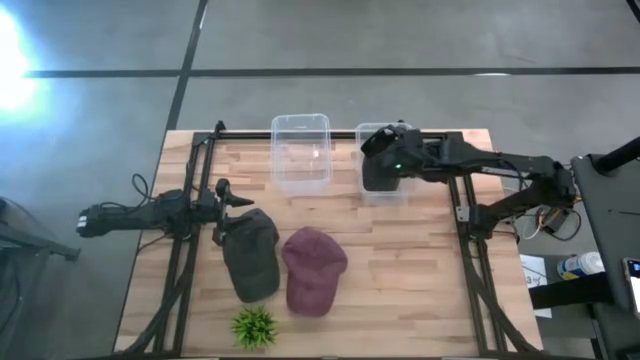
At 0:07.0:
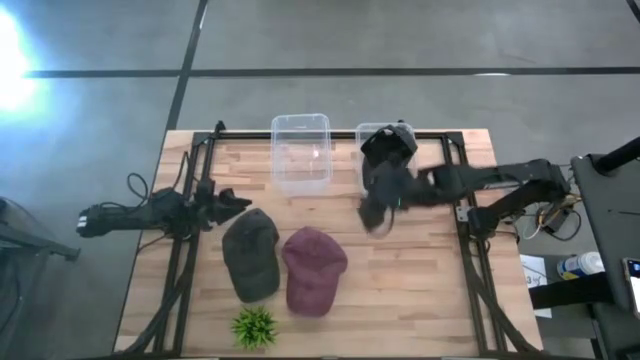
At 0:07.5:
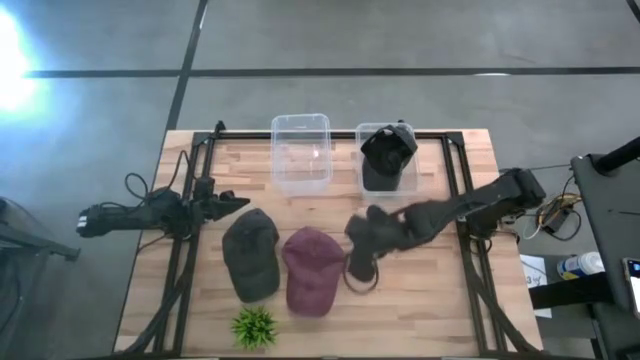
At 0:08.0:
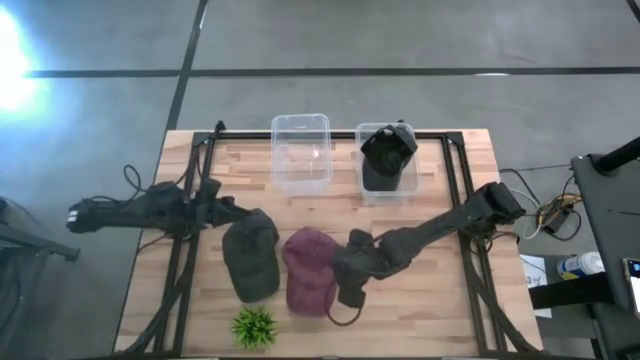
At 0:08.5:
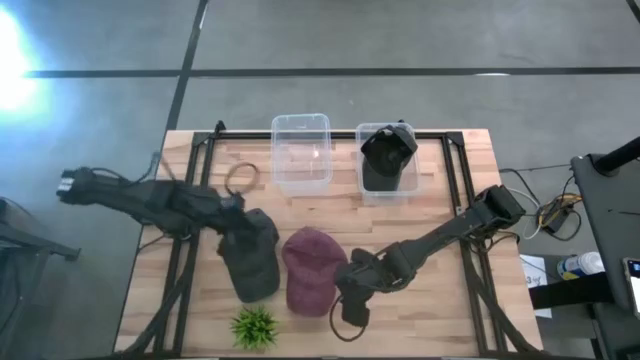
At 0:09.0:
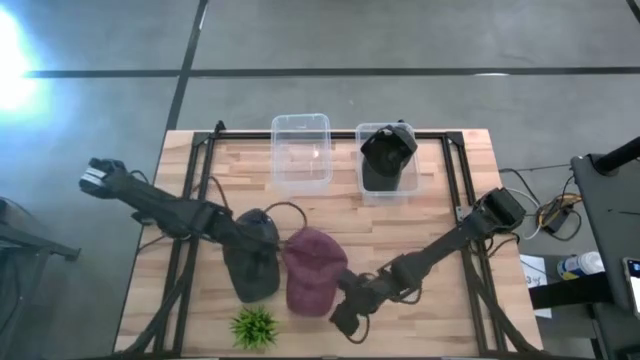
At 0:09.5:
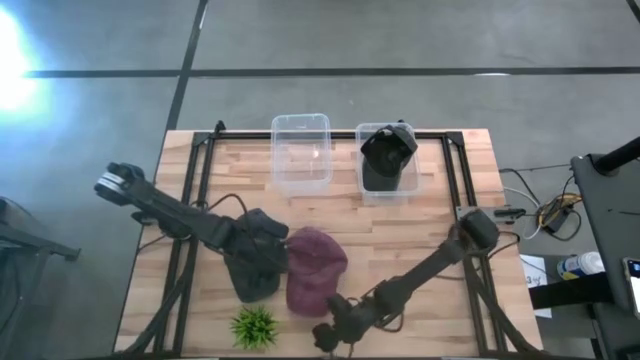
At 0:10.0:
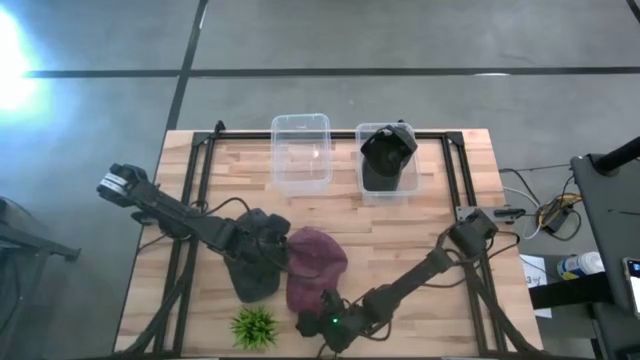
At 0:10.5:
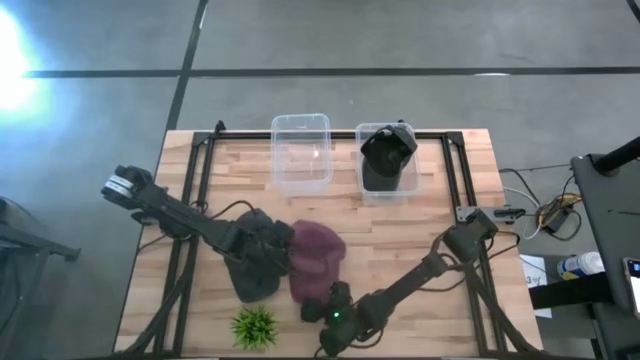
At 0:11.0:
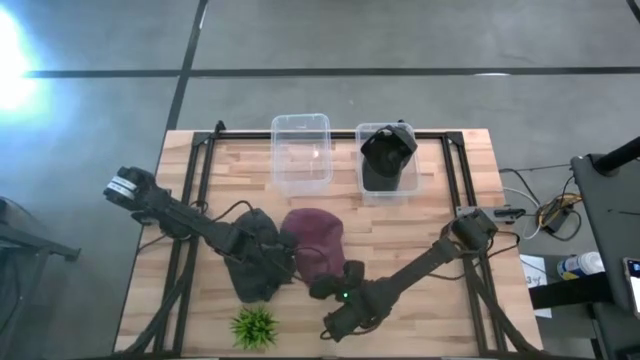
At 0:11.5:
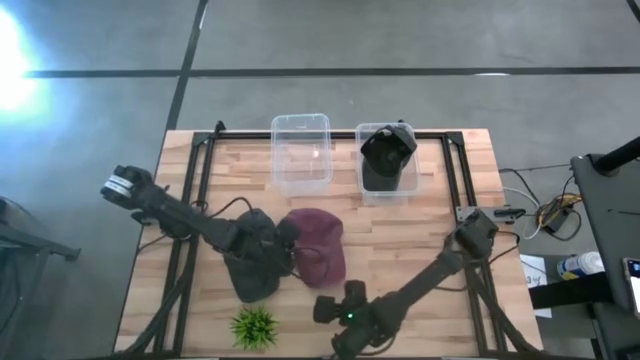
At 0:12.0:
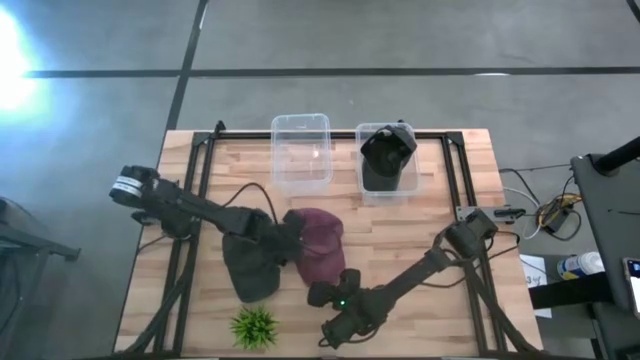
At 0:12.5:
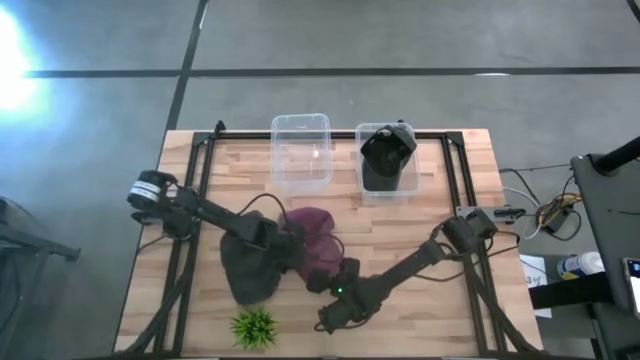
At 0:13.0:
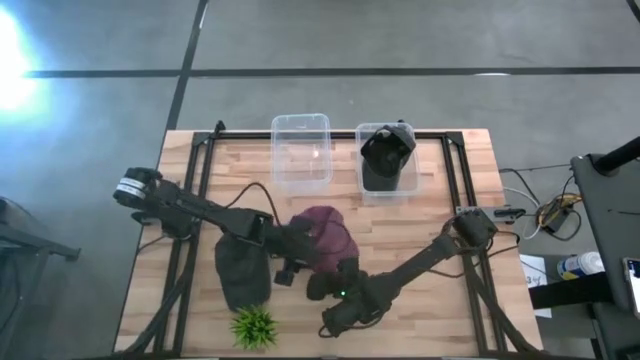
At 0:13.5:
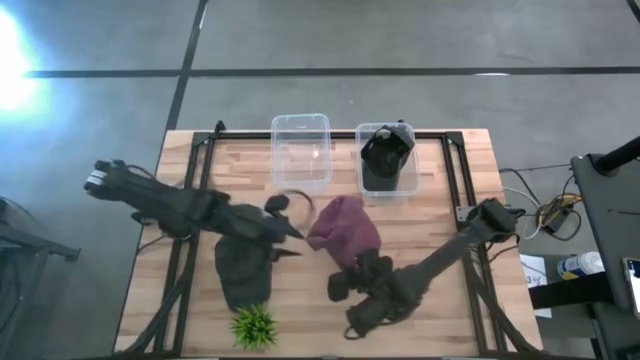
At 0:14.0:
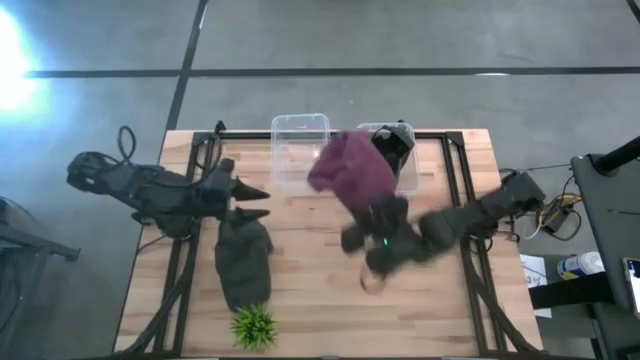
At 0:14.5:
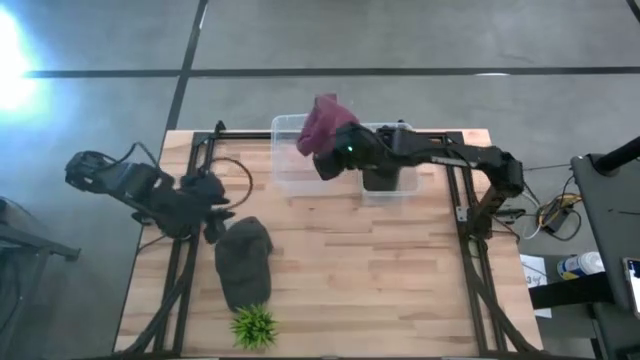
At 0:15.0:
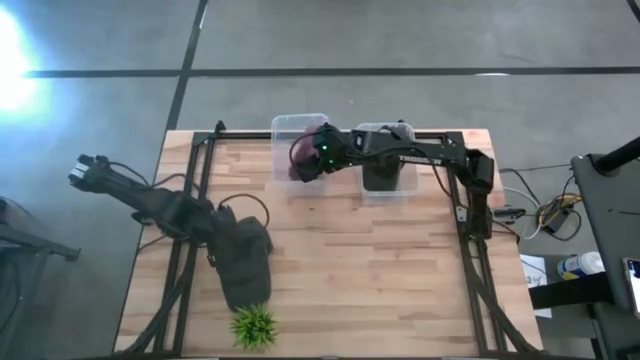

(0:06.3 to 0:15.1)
Task: Pick & Place hat
Put the pink cap into the left transparent bin

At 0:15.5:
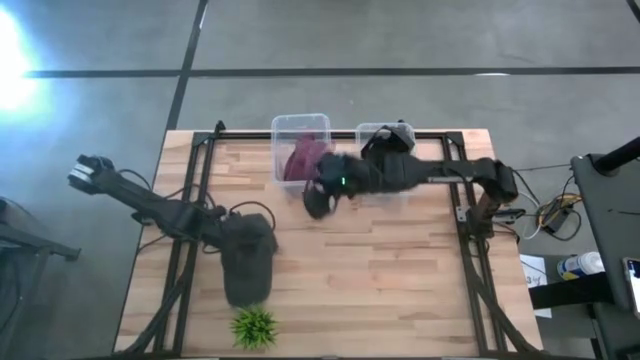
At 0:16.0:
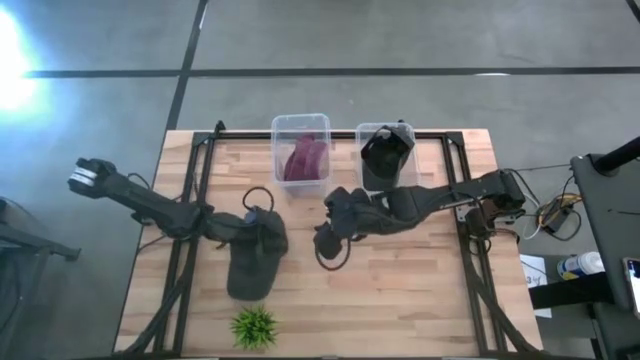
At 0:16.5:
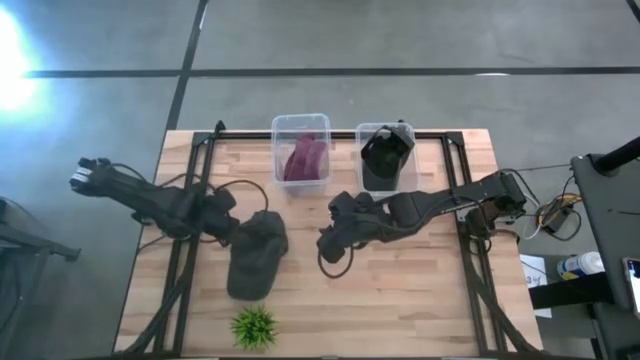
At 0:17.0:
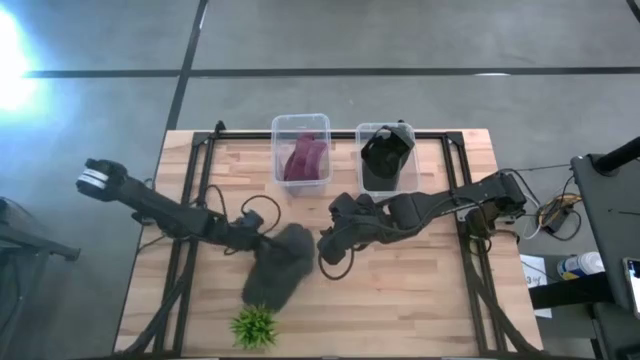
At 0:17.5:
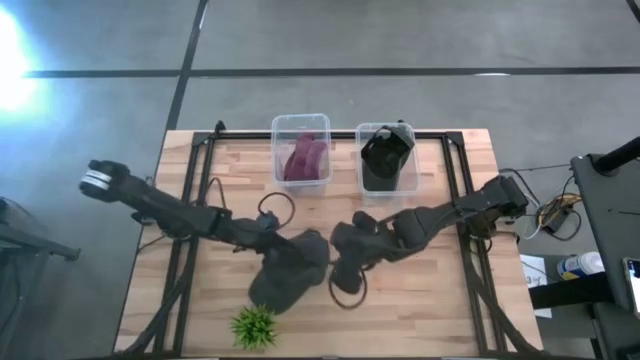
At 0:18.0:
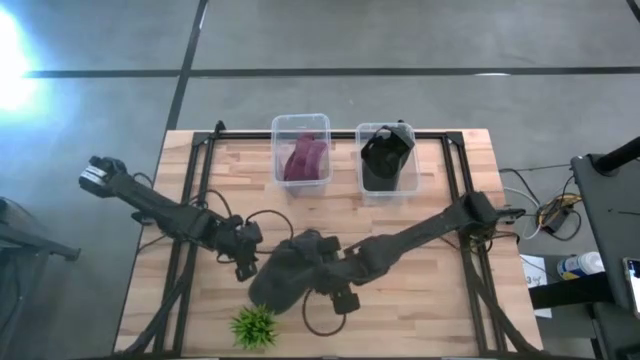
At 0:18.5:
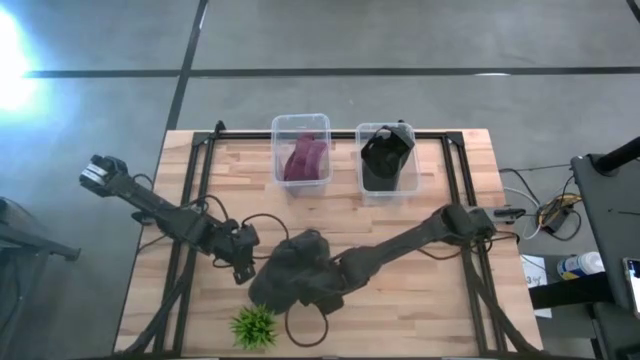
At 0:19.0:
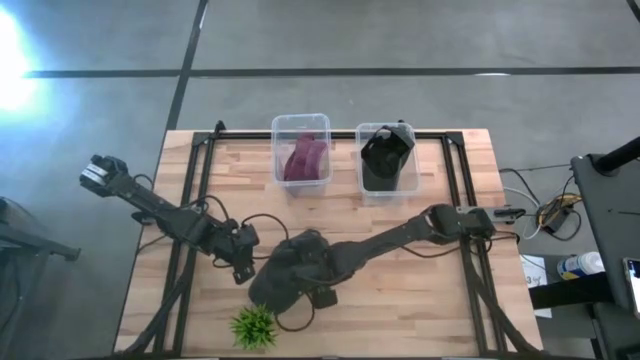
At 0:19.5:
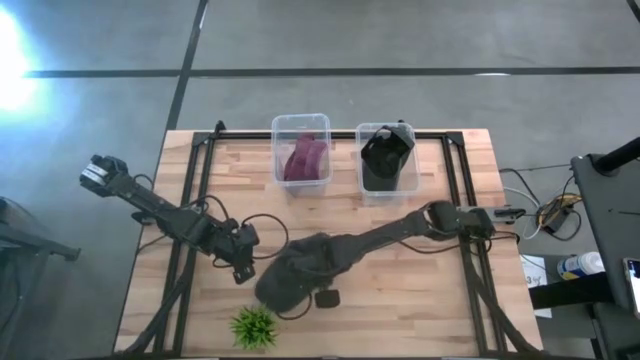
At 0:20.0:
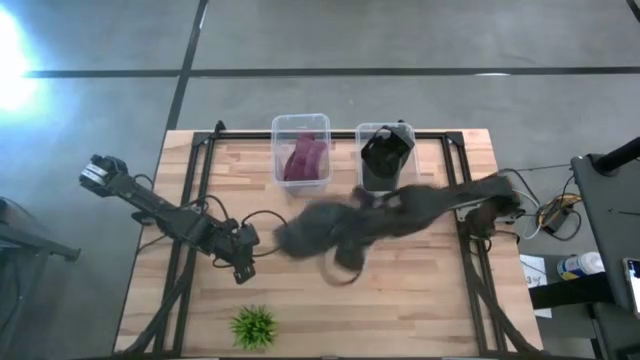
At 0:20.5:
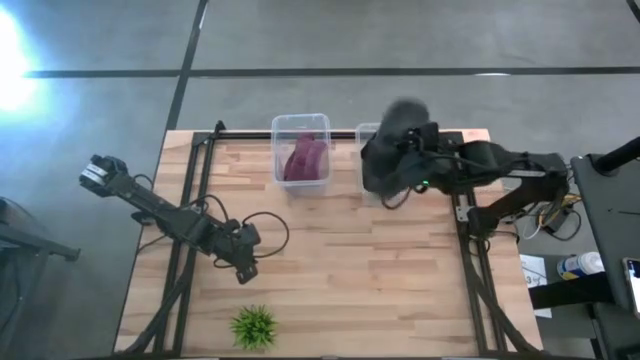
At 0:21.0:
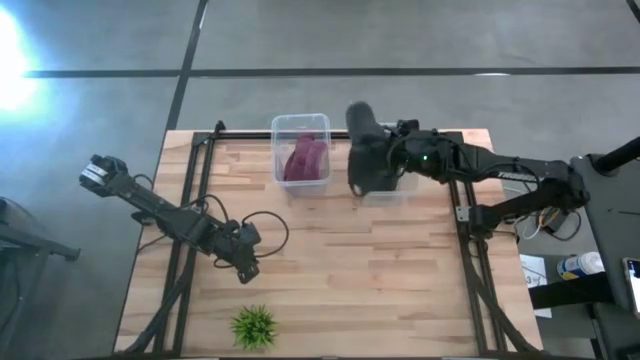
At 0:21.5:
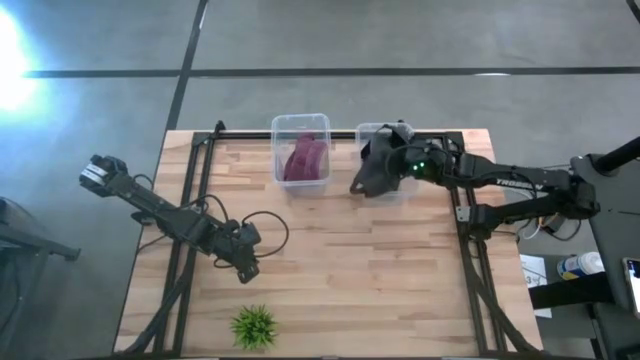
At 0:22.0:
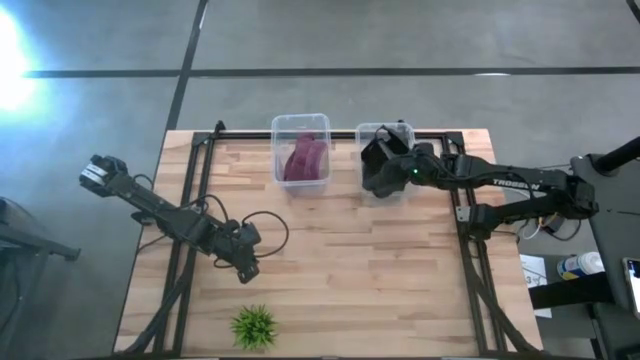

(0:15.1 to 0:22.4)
Put the black cap into the right transparent bin

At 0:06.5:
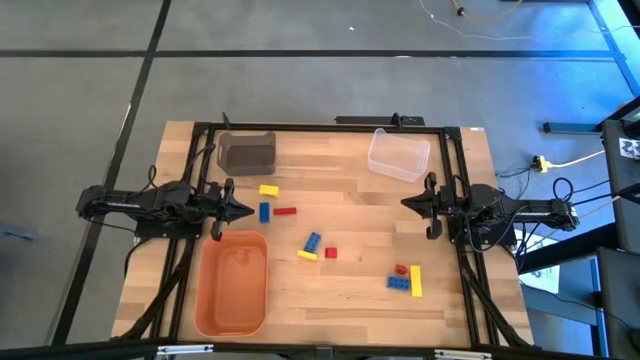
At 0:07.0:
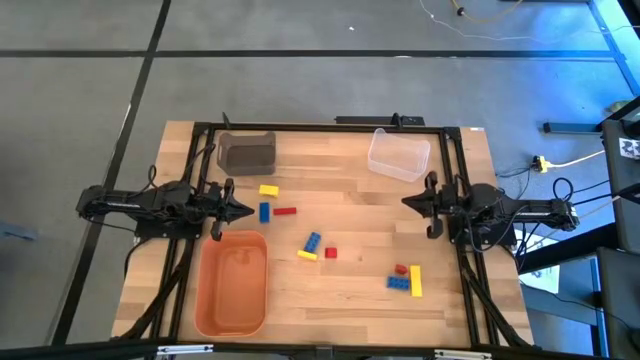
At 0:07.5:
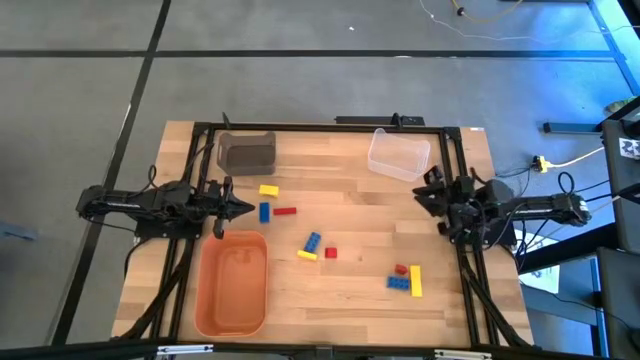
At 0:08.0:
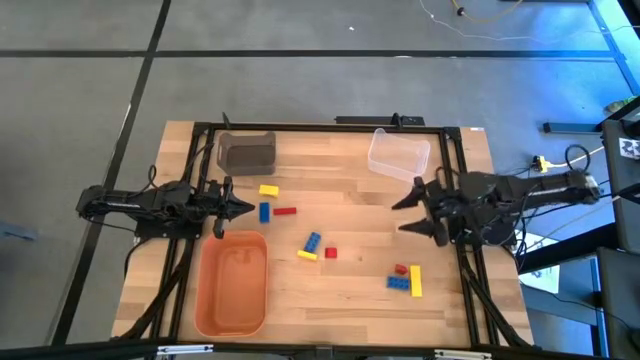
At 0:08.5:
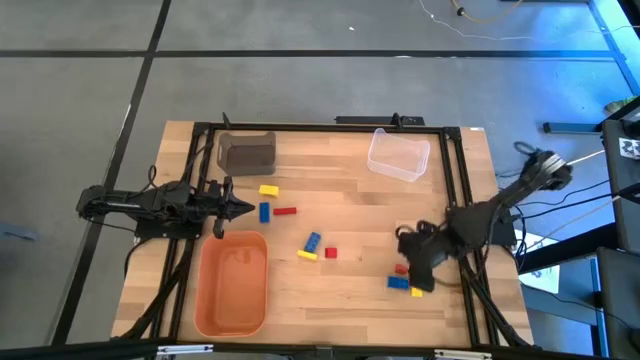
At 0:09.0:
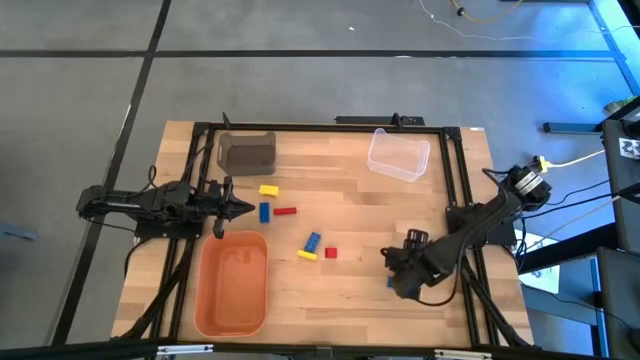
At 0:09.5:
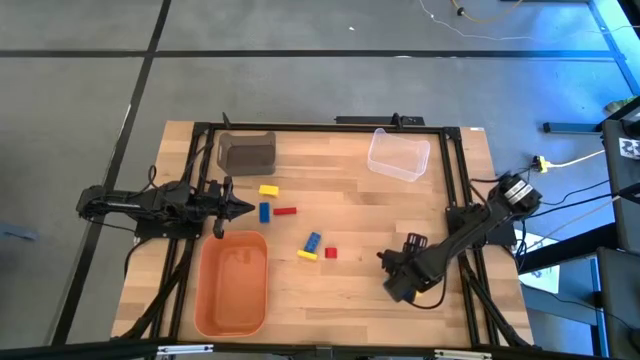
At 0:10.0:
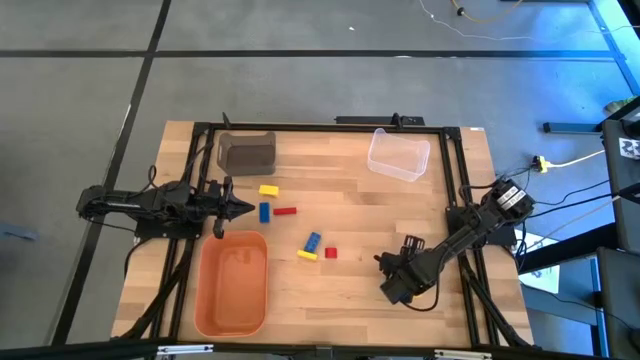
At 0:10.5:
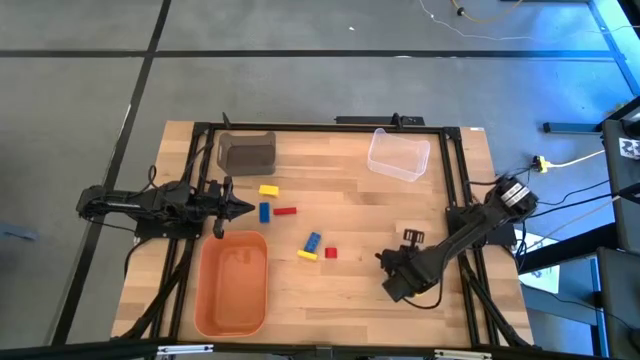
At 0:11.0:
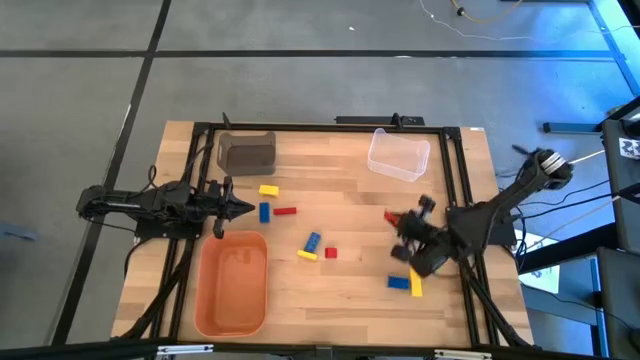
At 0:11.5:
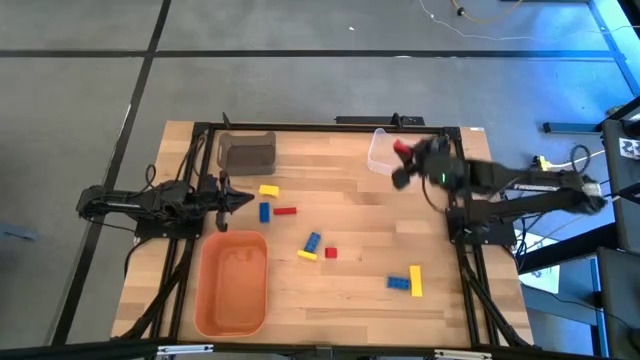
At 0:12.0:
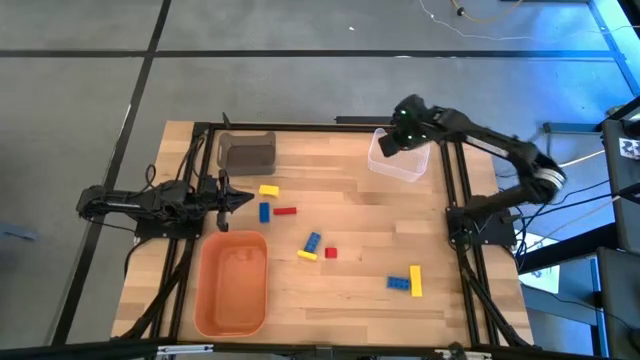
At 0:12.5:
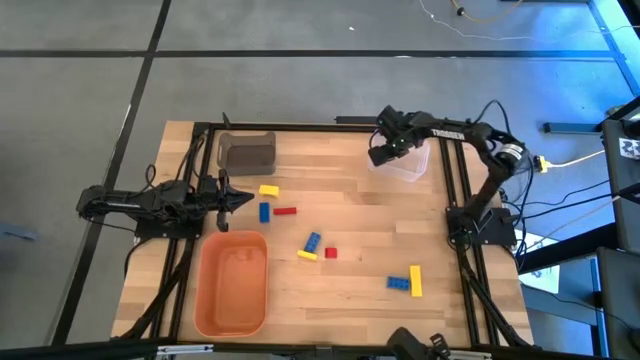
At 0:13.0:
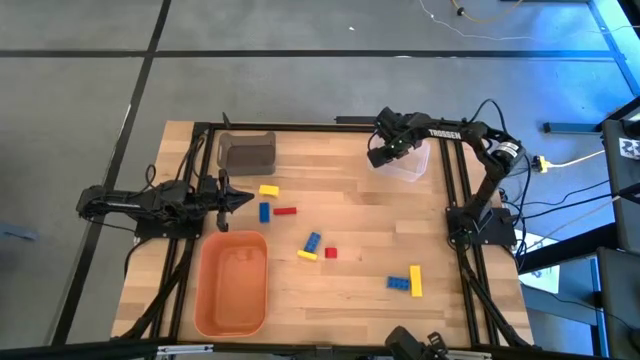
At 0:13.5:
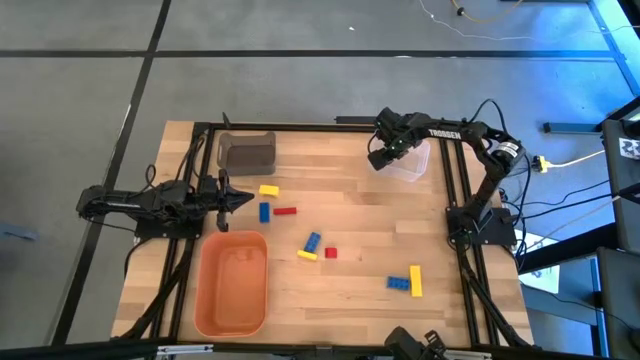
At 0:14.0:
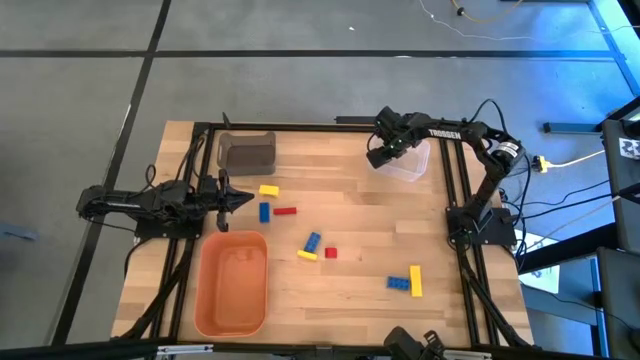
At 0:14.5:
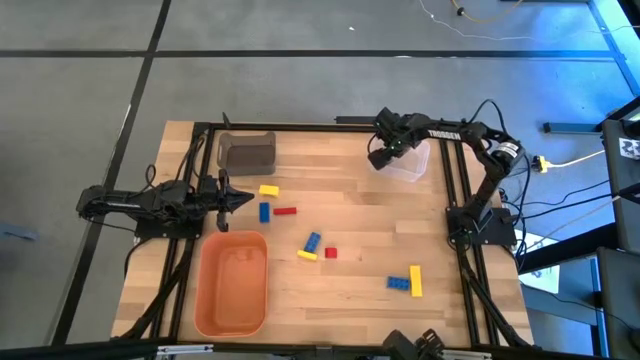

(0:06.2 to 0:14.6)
Task: Sort & place blocks by color
Put the right red block into the transparent white bin
